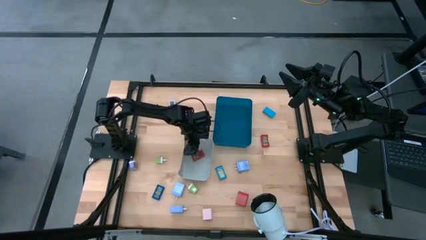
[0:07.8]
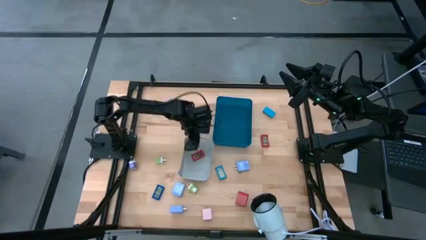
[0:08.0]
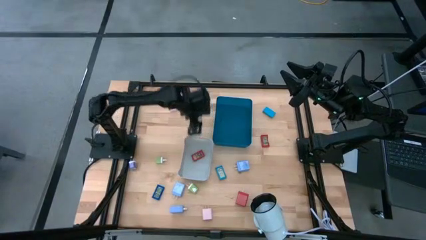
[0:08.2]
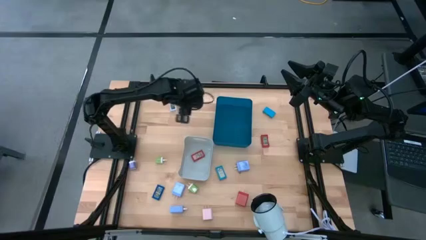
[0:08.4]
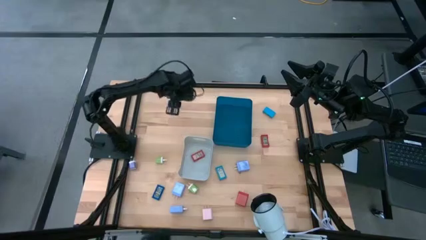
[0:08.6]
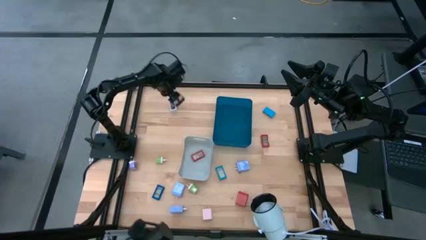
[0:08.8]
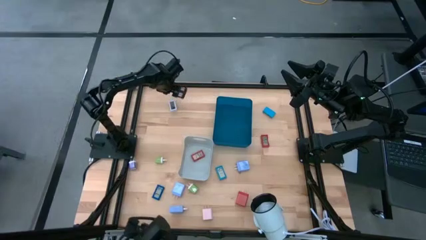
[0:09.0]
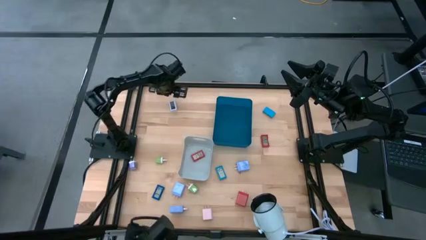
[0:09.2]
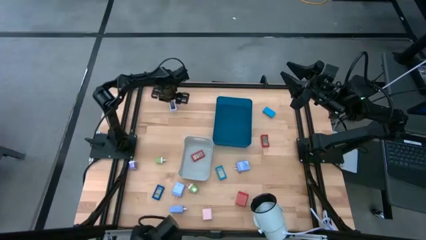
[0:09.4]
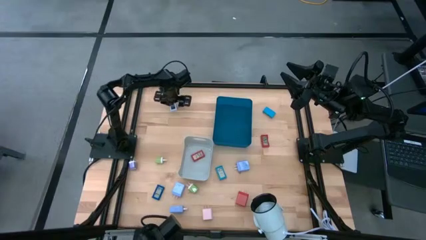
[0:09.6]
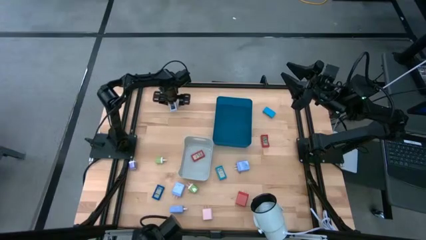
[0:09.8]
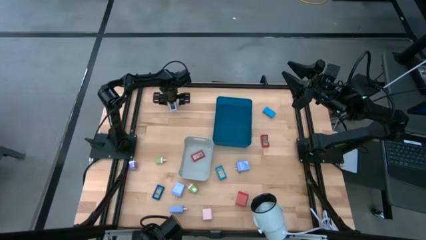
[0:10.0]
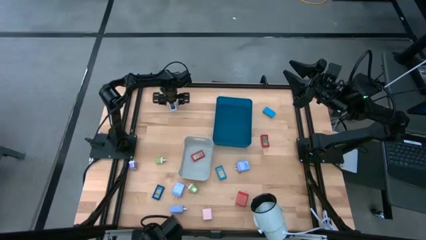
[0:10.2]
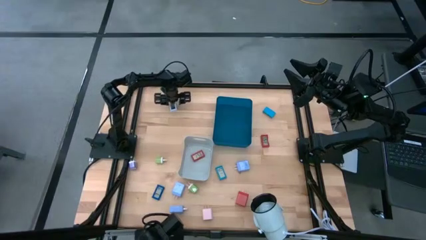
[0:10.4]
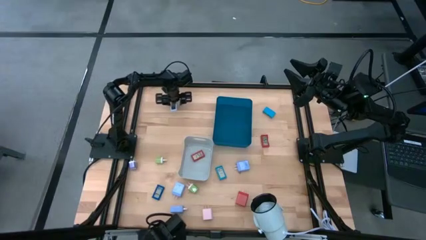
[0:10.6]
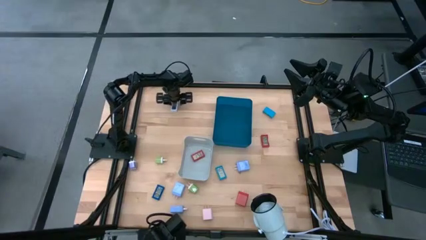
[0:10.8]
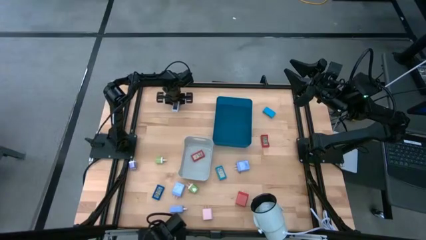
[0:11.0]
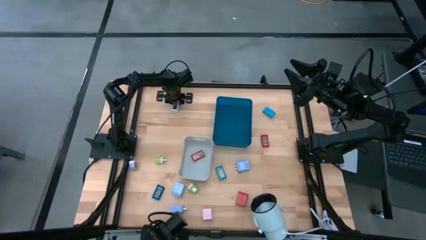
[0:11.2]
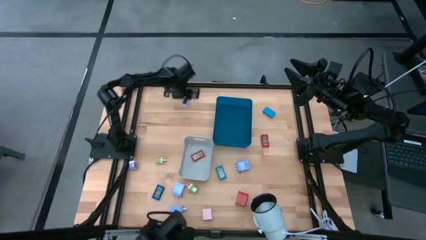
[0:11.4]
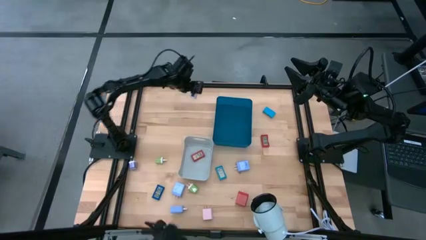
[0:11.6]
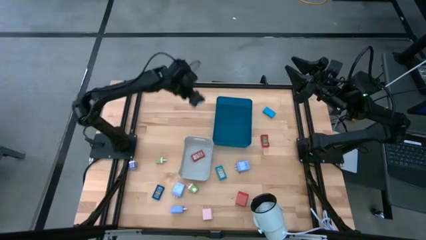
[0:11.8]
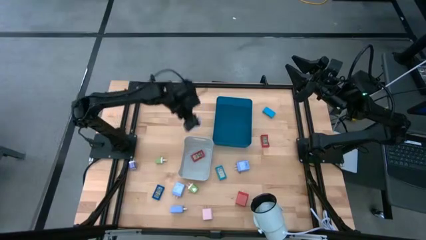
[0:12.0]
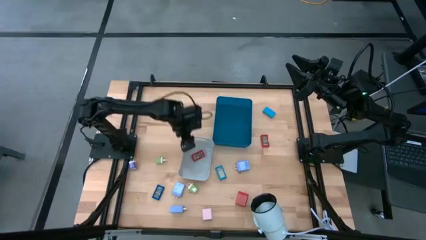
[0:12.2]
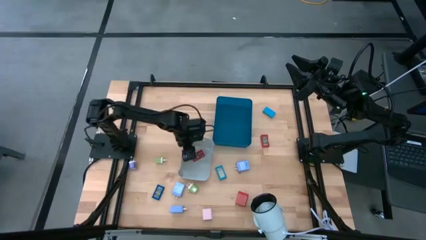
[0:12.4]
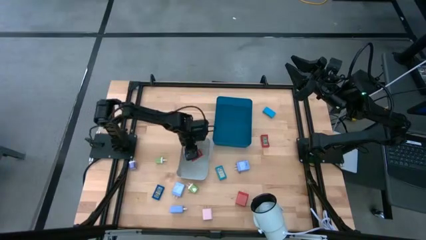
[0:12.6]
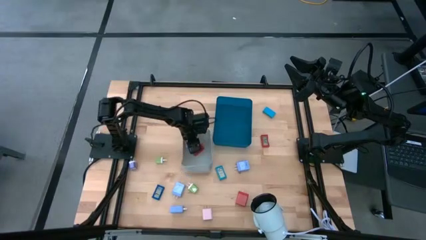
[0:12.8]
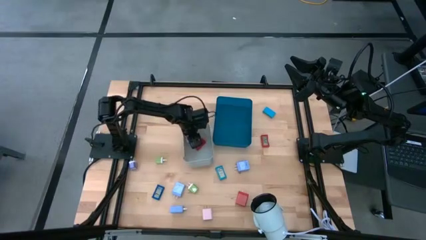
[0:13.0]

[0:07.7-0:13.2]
Task: Pick & Place Office items
Put the white timer into the gray bin

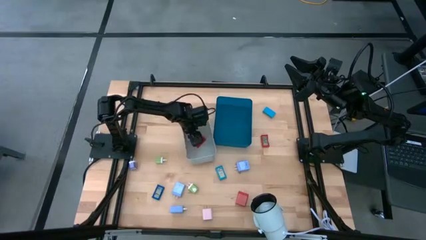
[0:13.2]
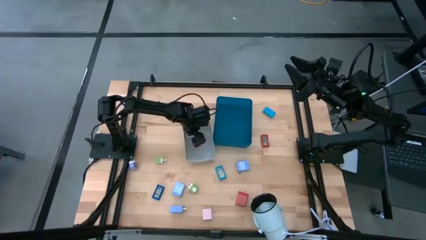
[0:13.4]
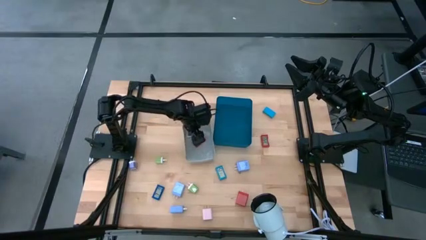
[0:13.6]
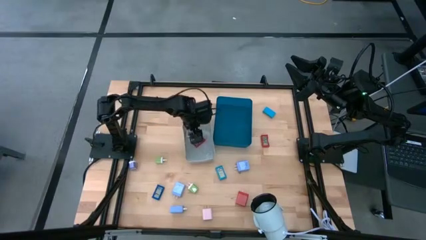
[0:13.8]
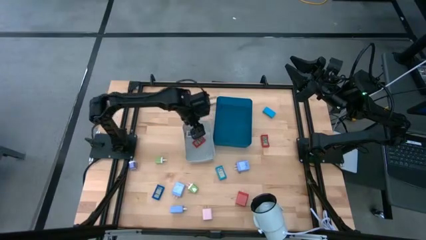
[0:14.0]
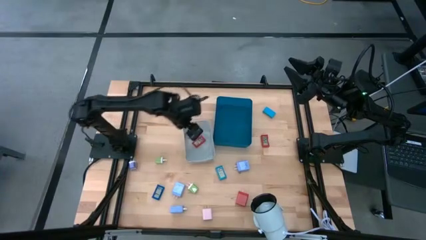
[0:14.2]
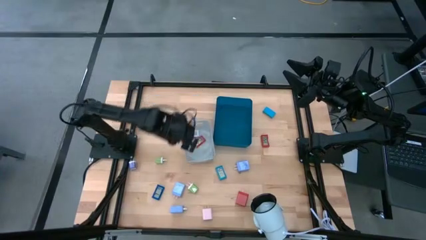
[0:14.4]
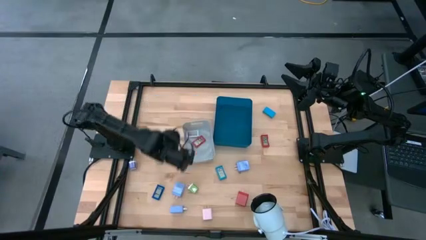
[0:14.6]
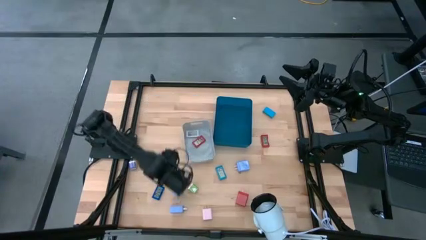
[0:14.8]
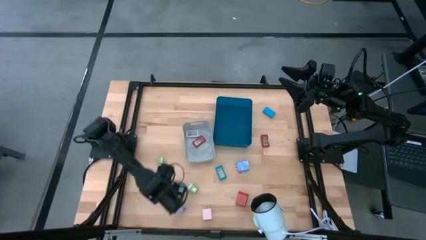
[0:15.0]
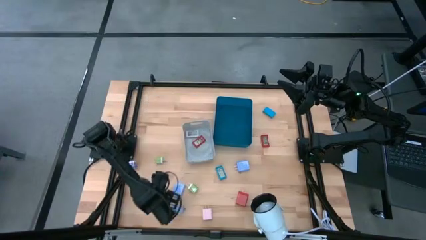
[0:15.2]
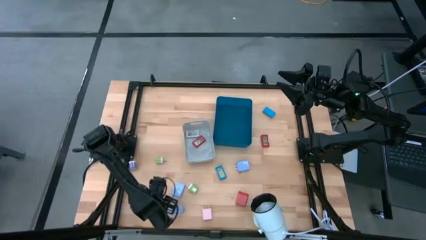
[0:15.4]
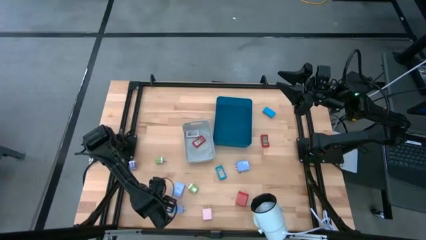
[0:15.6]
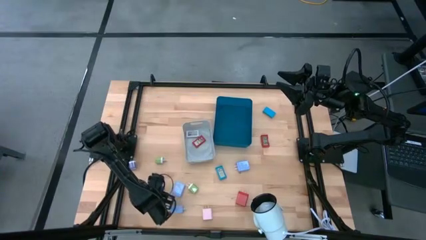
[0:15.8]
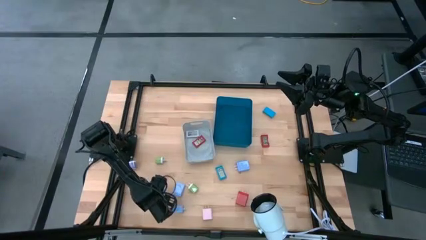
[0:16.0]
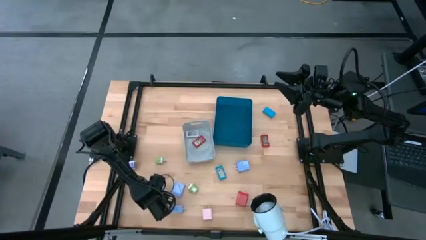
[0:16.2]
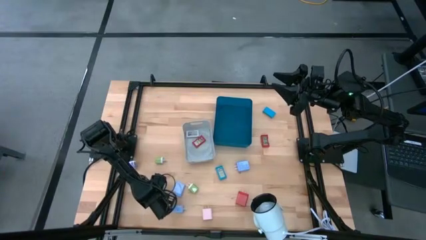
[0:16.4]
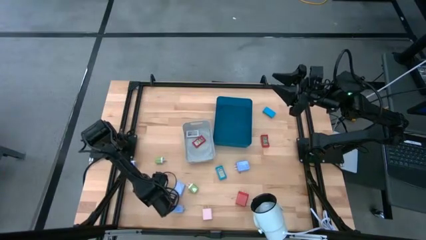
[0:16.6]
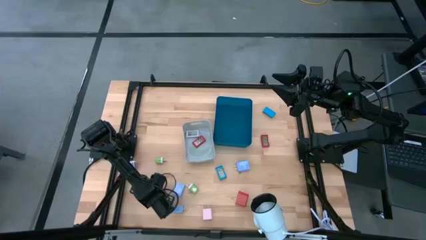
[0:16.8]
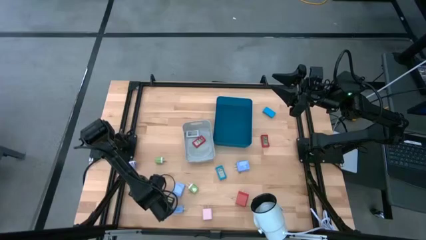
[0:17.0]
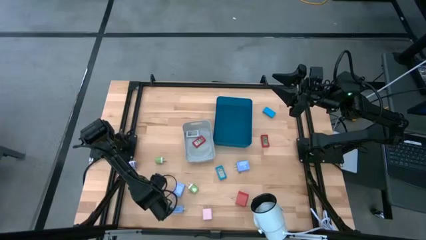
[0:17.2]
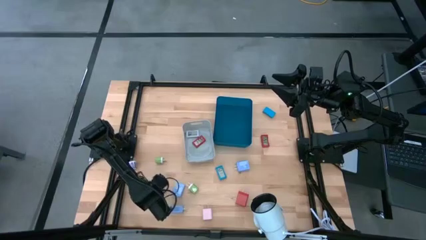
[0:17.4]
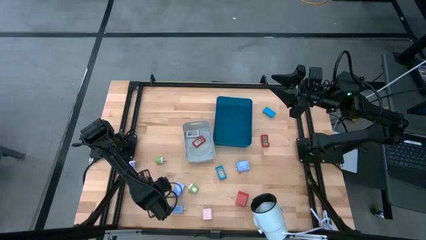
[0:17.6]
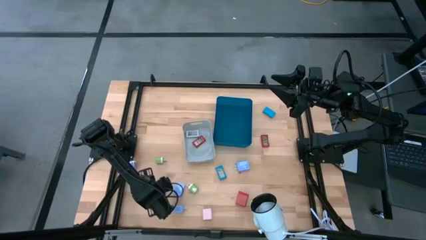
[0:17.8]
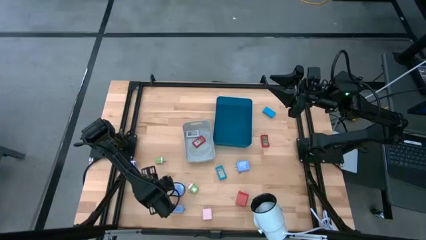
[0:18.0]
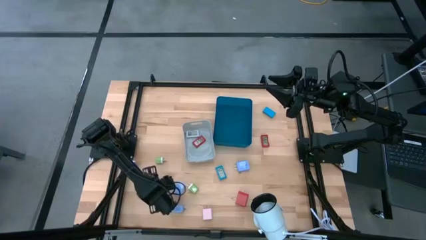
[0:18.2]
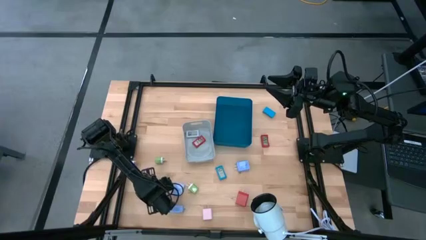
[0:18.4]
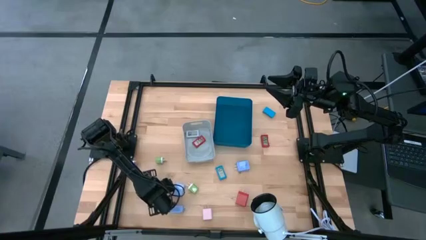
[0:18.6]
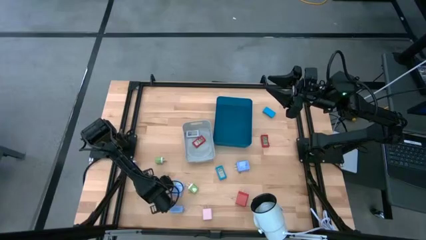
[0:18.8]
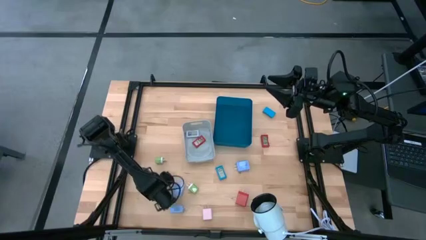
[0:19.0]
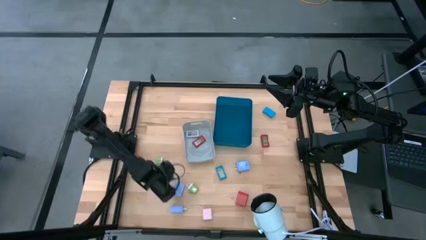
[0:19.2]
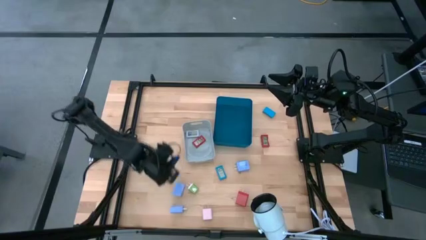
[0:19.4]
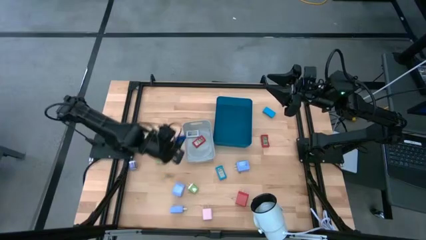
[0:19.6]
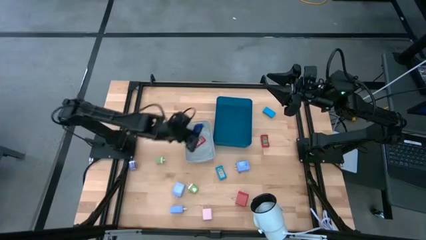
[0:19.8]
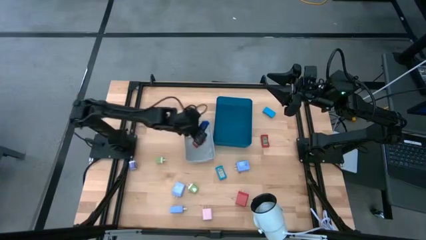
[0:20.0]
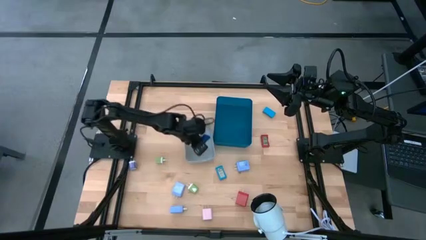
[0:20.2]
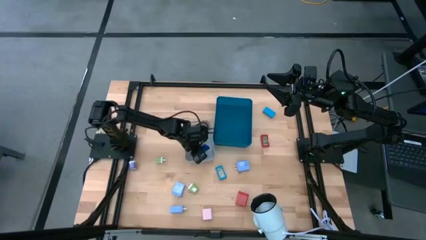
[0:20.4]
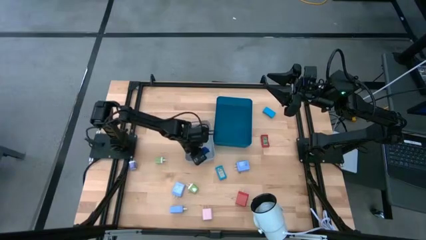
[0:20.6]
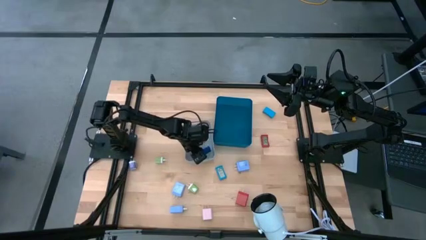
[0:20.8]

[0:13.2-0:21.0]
Put the dark blue timer into the gray bin

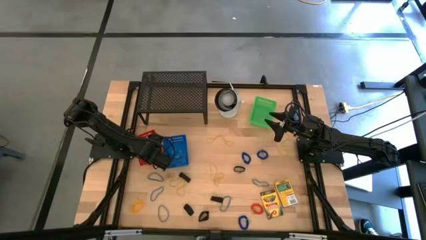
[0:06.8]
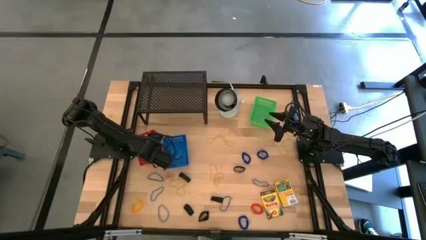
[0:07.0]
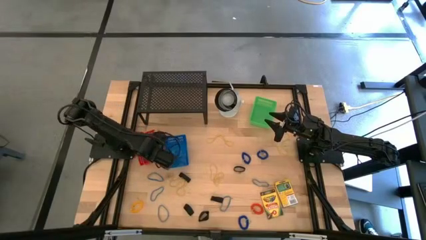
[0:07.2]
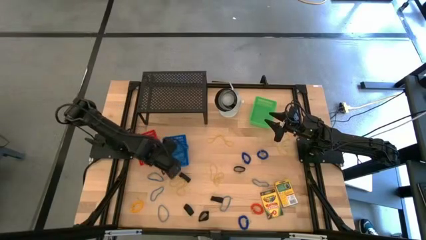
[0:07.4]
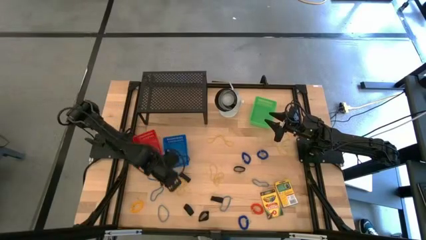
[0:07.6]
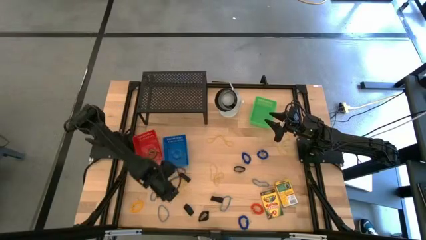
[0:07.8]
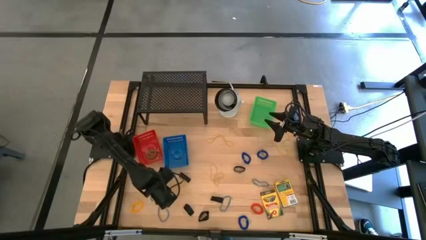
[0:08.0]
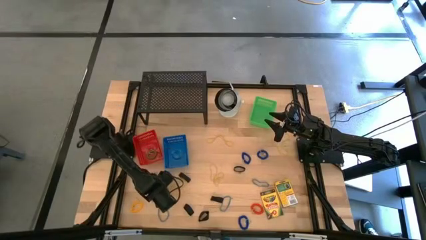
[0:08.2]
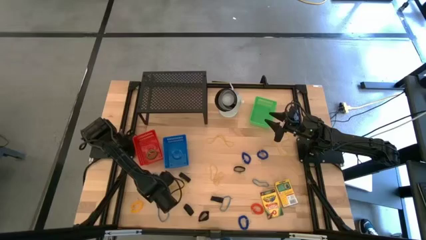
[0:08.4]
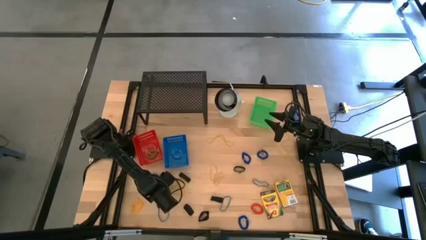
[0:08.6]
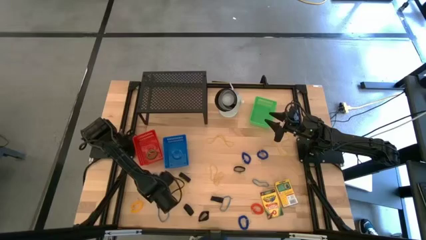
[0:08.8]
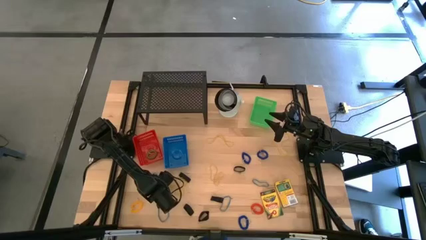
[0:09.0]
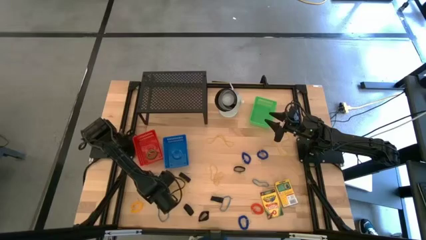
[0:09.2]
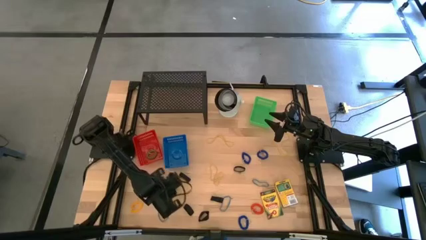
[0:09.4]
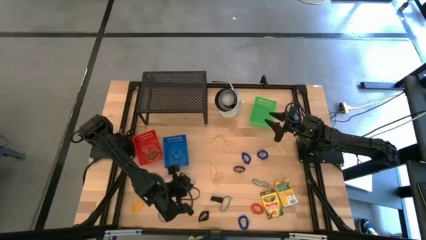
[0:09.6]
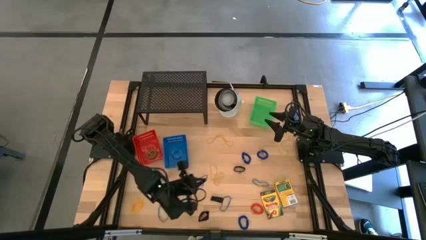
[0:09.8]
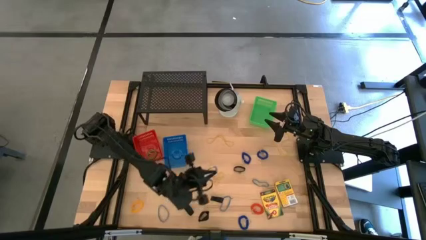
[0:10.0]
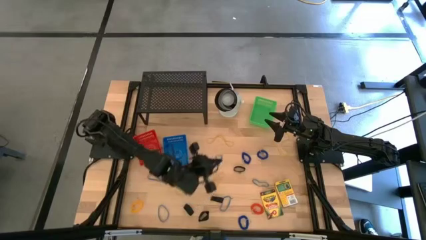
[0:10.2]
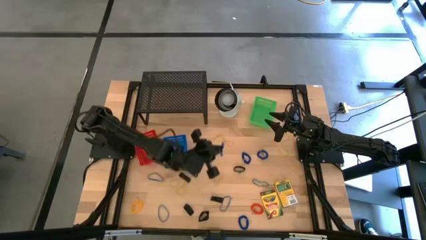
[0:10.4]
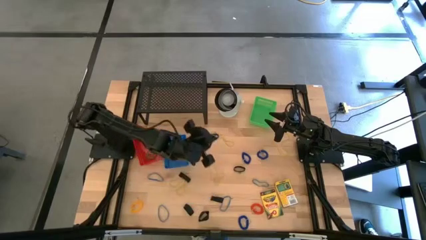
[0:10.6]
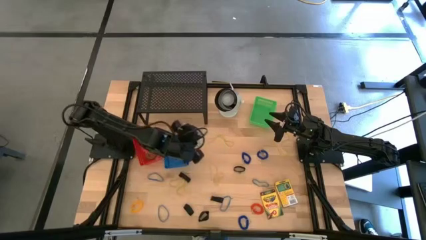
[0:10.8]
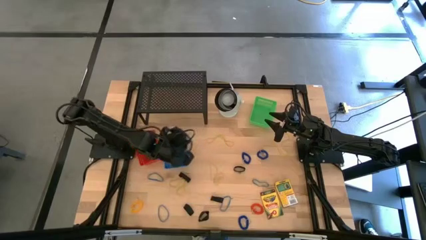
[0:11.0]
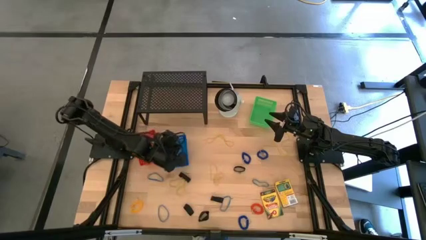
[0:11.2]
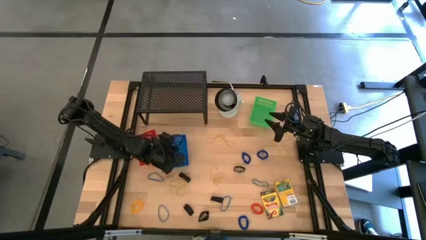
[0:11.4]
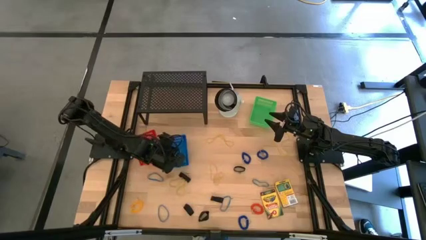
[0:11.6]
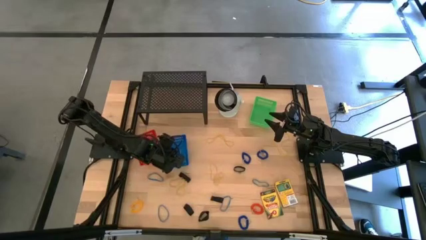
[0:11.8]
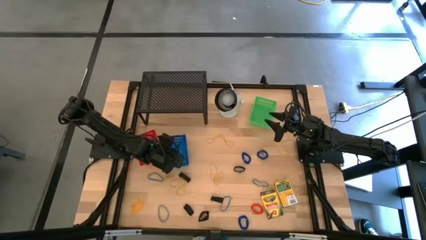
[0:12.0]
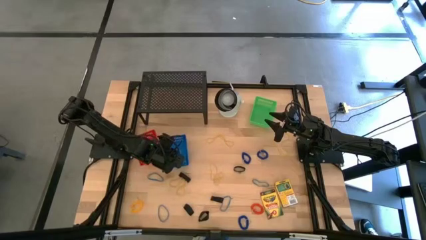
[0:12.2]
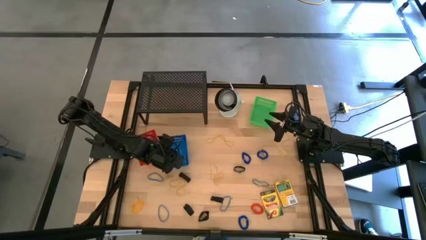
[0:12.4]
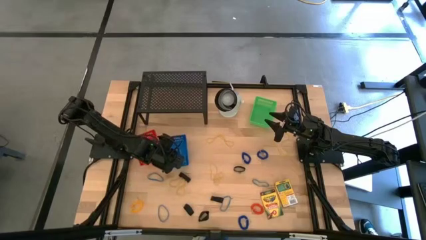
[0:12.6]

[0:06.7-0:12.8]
Task: Pick & Place Office Desk Supplies
Put the blue rubber band into the blue bin
